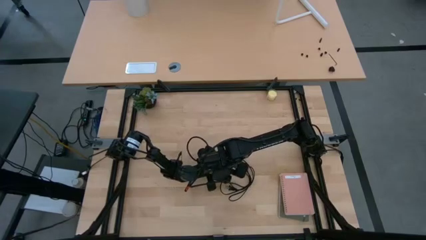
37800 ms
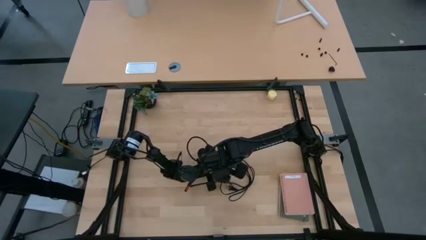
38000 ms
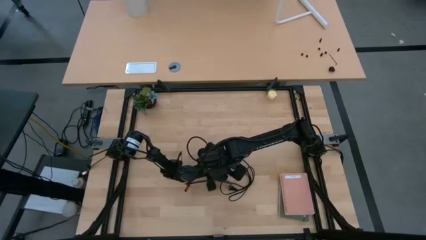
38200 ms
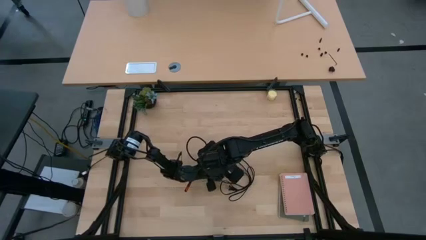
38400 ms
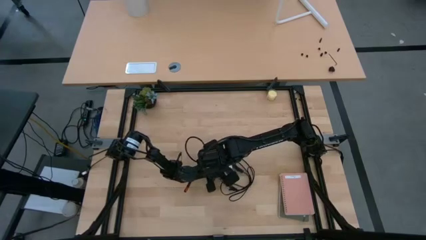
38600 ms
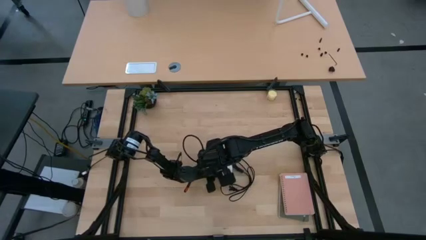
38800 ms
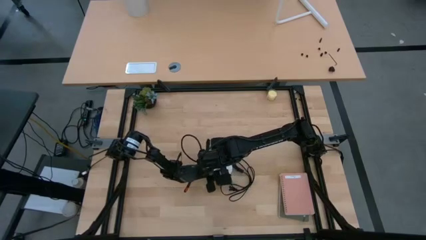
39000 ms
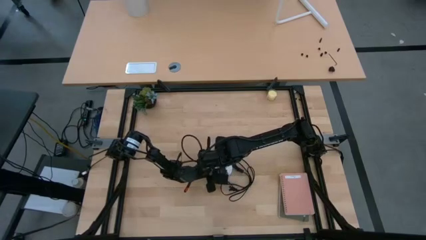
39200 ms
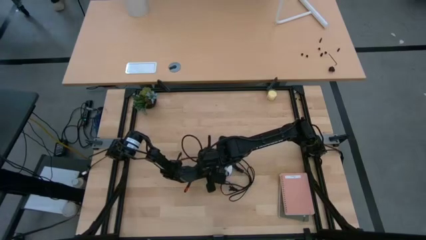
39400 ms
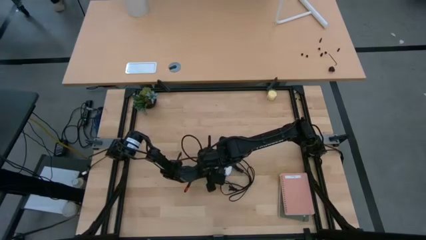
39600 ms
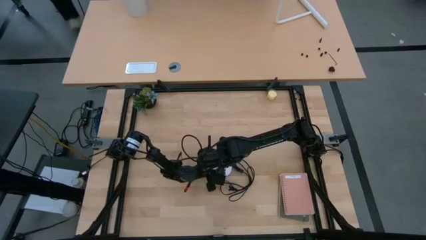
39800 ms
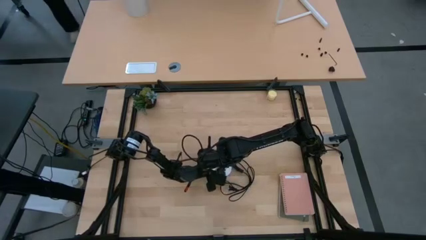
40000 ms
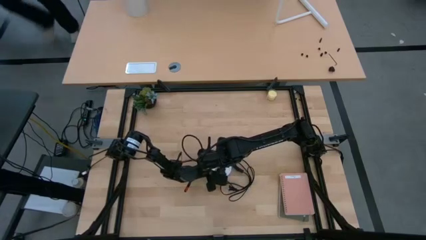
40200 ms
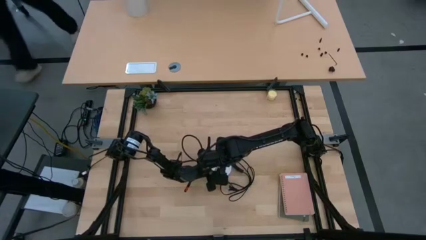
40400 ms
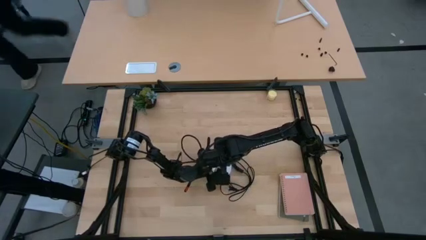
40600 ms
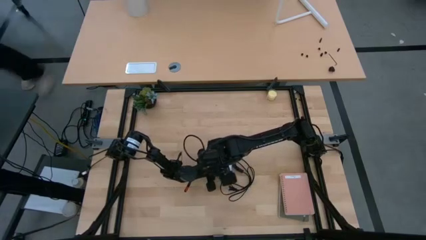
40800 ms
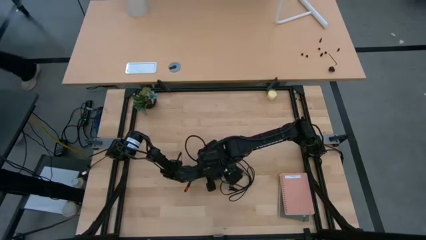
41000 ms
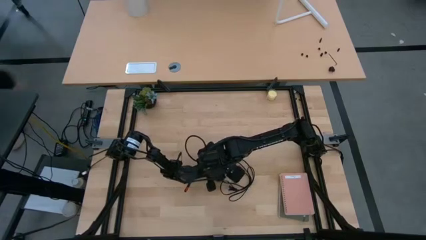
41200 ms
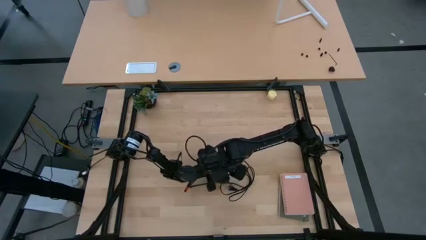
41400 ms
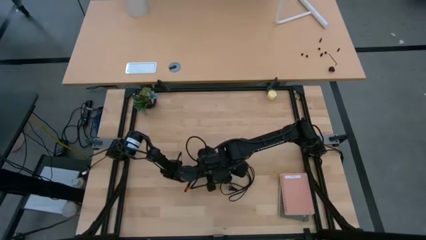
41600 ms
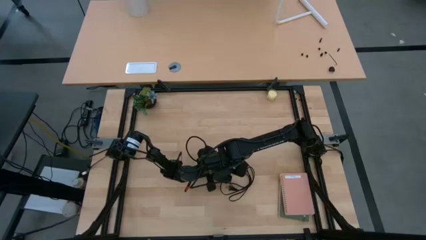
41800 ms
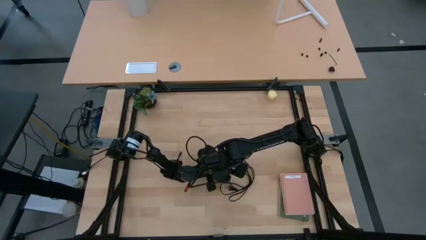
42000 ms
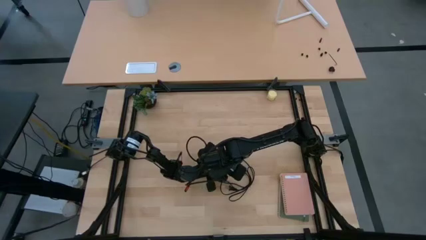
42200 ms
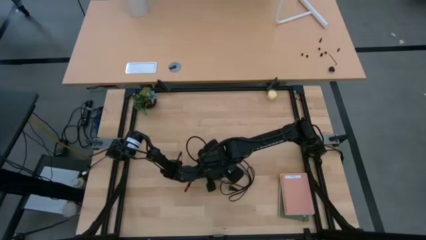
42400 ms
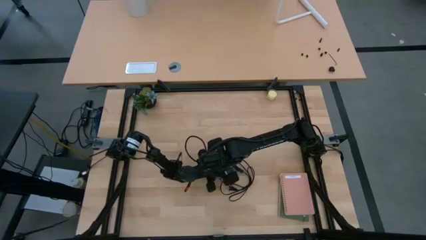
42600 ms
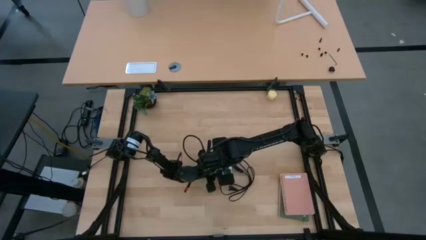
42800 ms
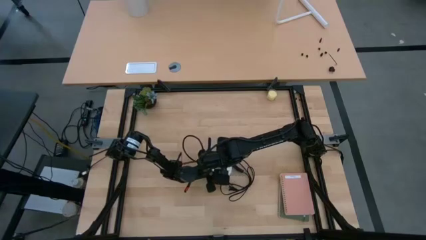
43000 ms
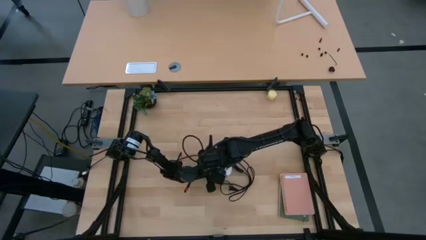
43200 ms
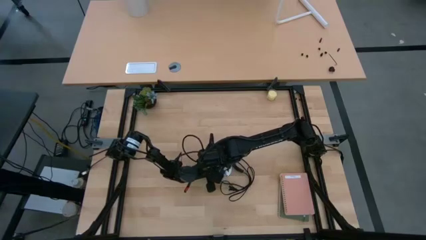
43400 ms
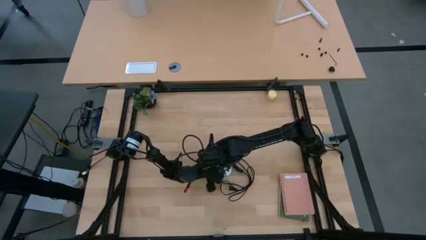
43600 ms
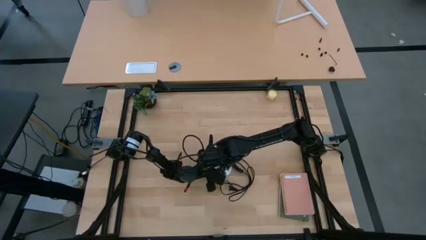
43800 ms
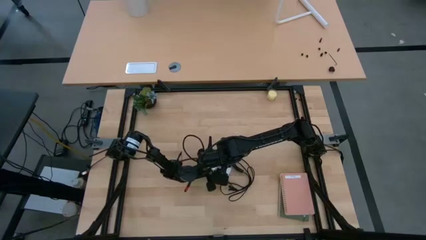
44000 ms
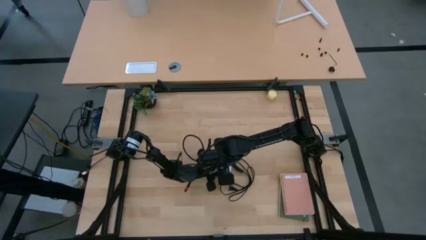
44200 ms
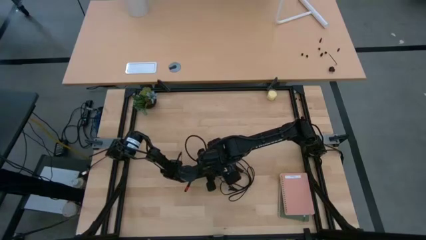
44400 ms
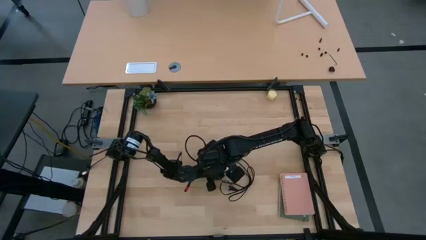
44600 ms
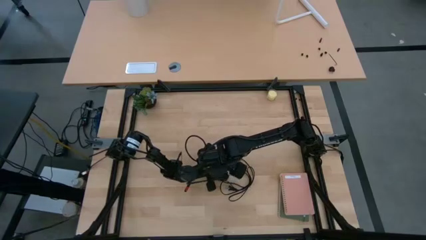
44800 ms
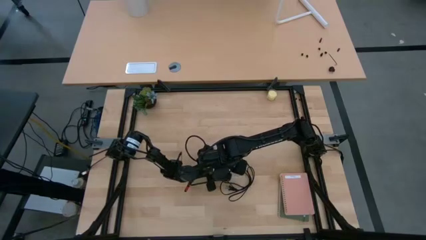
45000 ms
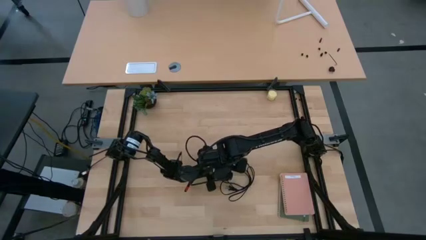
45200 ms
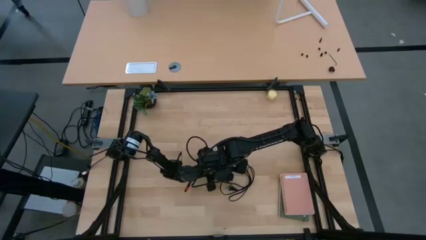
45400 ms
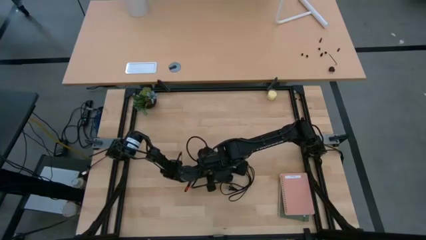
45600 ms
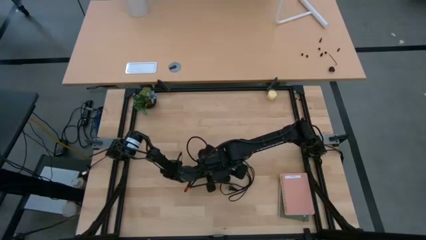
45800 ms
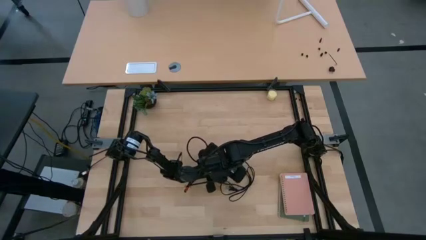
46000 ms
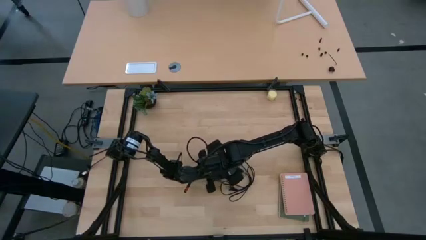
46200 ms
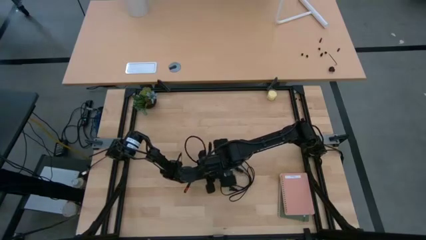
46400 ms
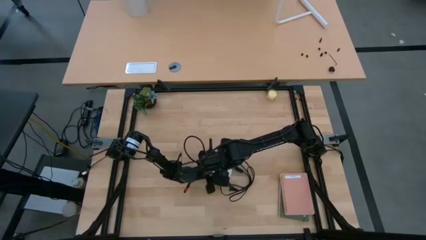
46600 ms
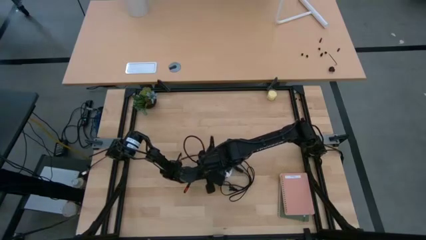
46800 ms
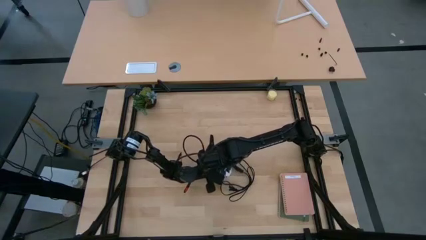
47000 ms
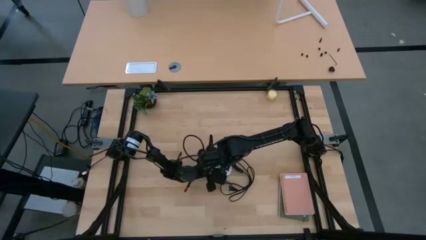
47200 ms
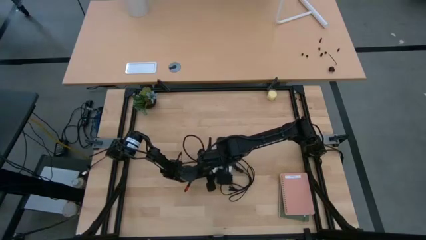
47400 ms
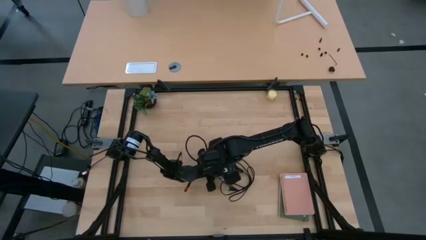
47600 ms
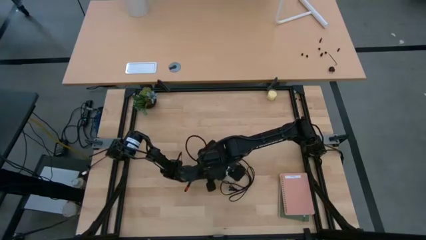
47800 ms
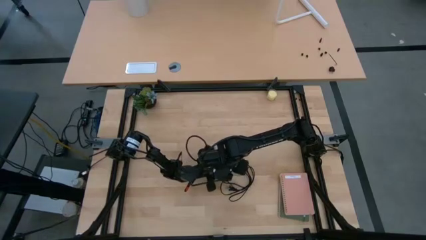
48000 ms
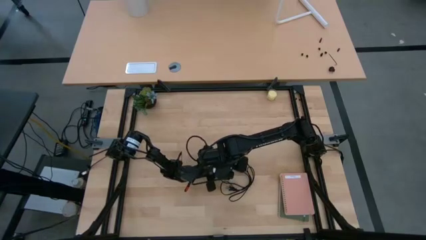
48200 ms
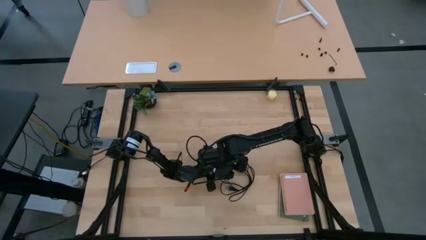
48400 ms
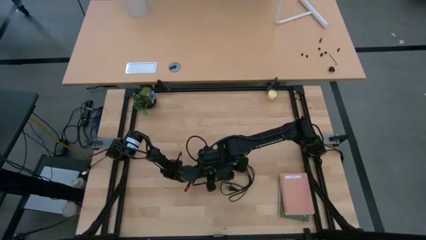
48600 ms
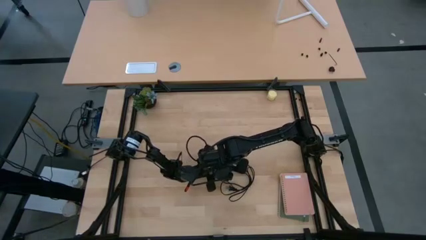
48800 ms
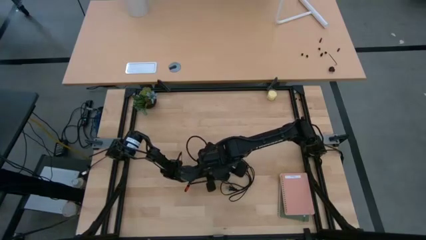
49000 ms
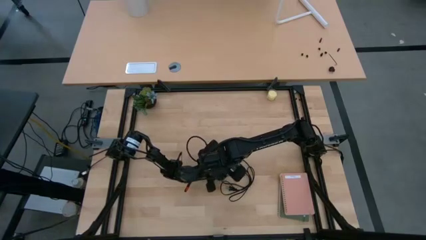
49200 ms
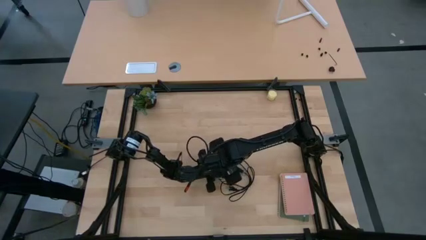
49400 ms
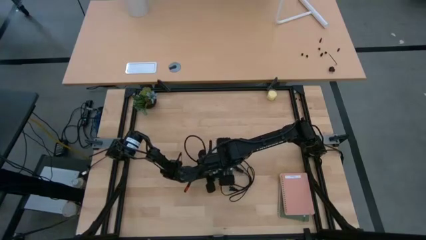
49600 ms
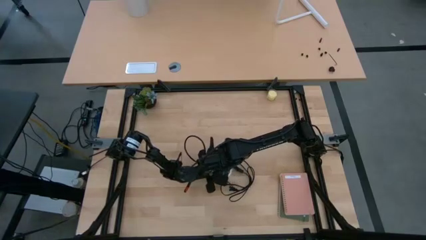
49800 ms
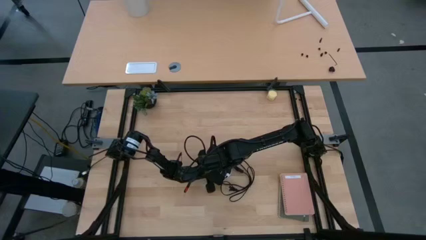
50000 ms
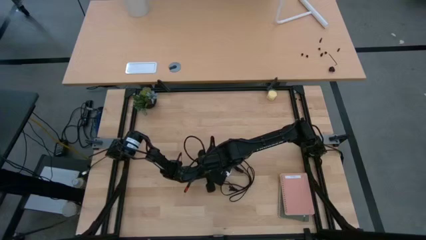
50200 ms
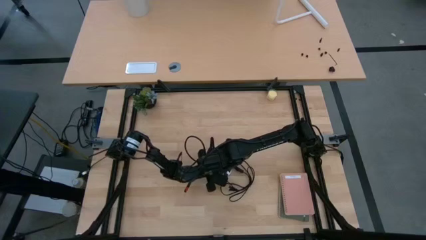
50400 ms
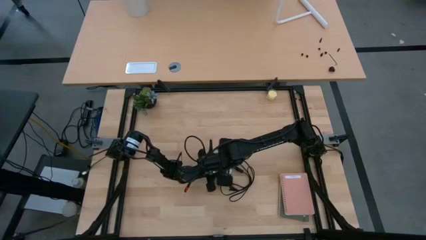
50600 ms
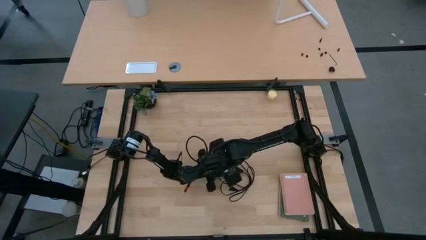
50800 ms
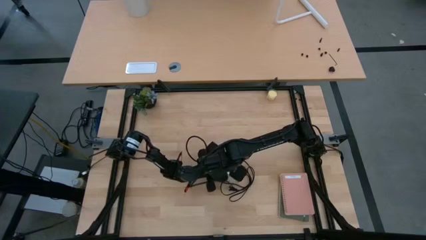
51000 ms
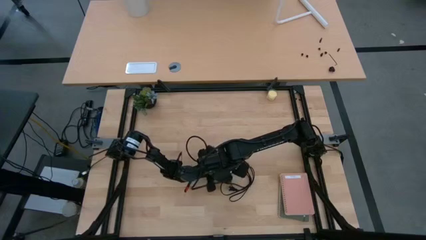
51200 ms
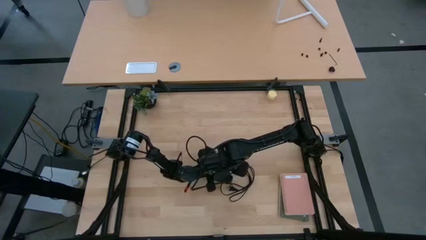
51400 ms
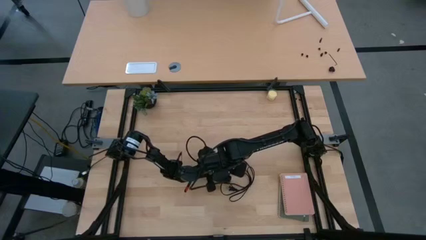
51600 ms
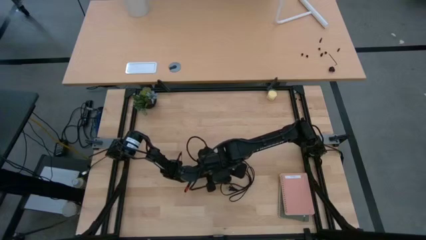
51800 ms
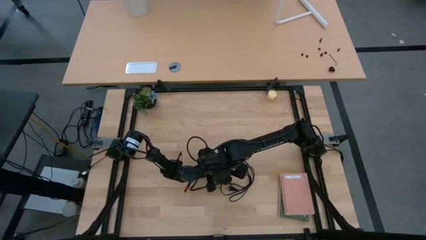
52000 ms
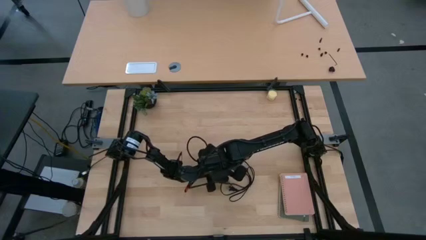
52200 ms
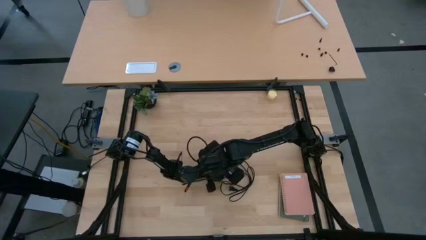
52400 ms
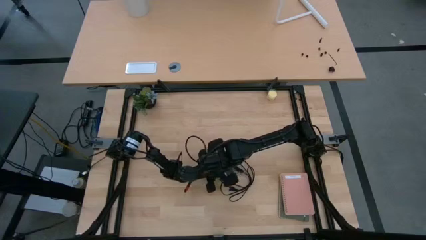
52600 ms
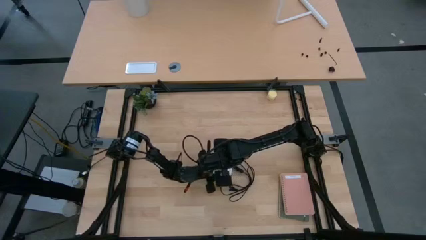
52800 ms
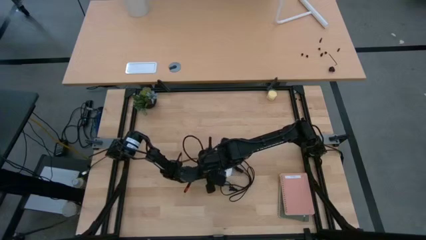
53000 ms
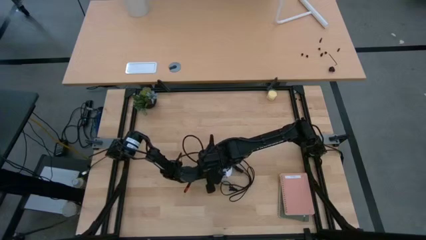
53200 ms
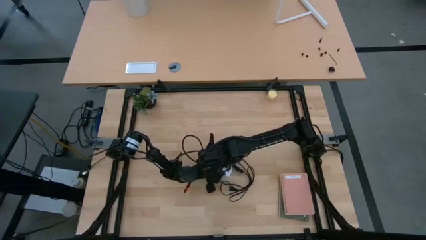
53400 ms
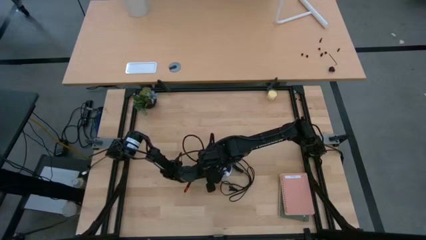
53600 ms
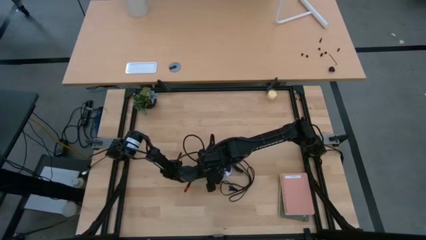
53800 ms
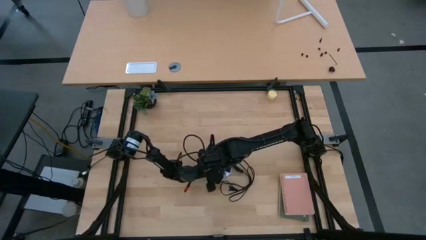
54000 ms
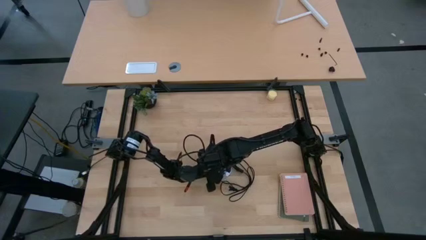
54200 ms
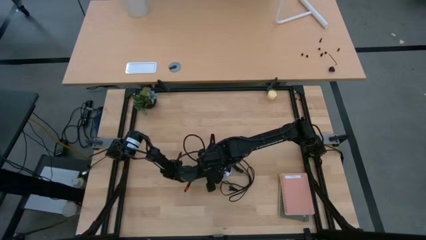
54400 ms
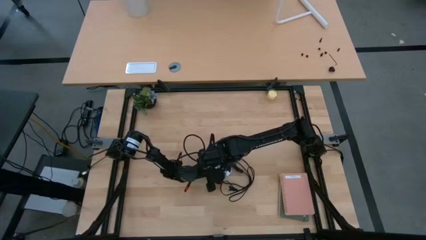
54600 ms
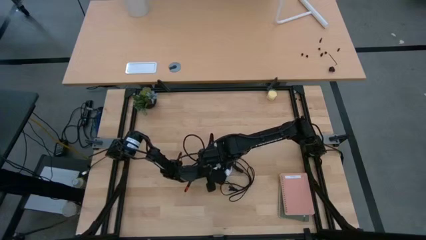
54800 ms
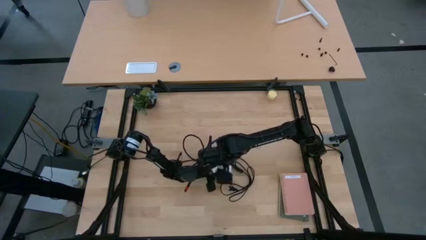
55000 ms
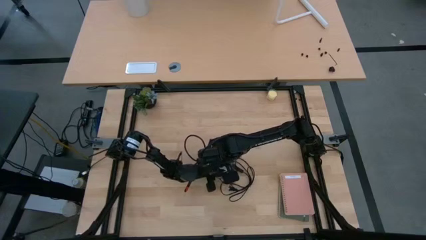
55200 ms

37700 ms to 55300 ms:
Task: Screw lightbulb
Insert the white lightbulb into the silver lamp
